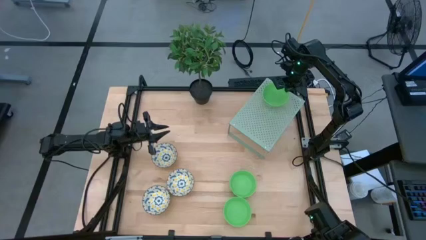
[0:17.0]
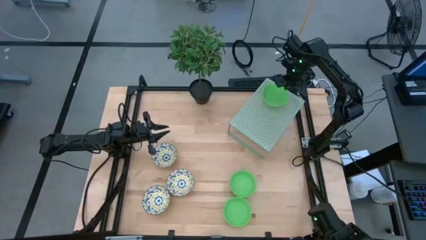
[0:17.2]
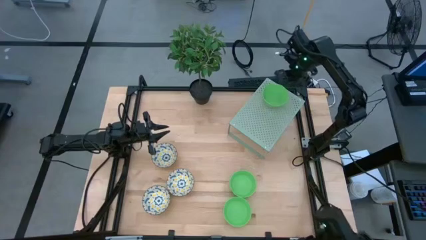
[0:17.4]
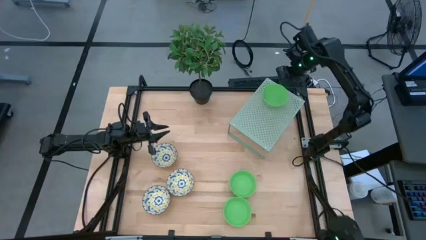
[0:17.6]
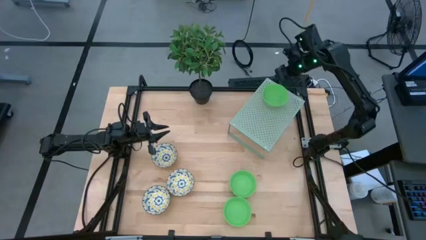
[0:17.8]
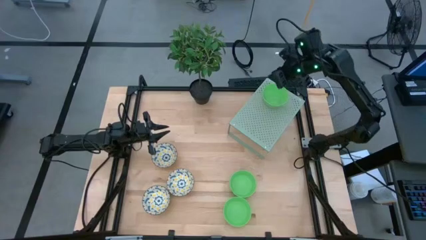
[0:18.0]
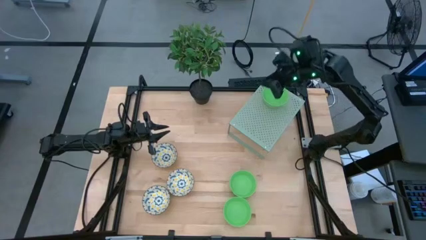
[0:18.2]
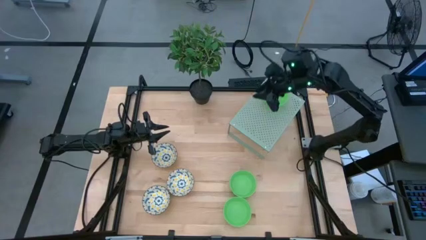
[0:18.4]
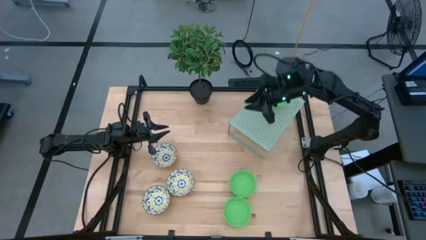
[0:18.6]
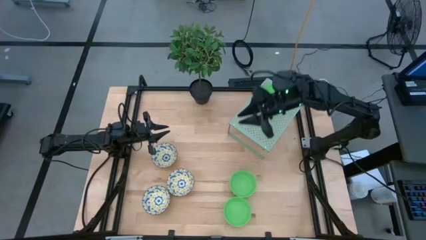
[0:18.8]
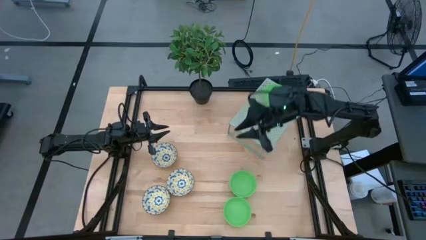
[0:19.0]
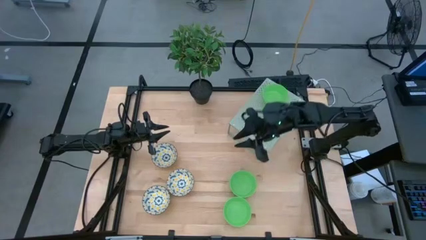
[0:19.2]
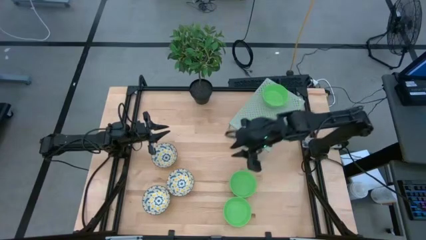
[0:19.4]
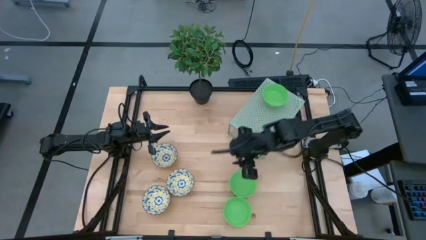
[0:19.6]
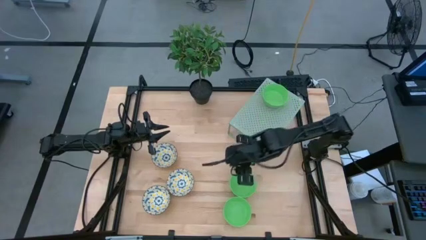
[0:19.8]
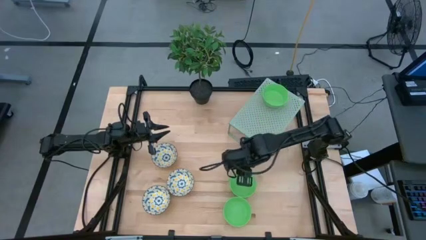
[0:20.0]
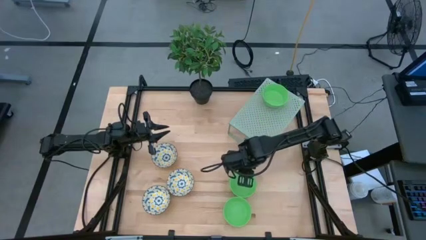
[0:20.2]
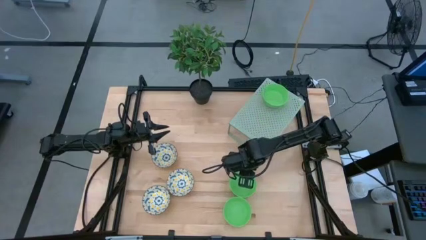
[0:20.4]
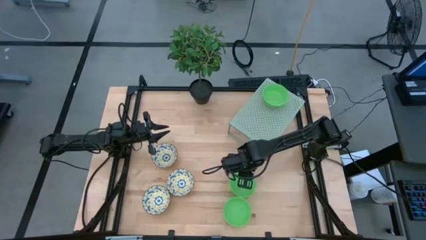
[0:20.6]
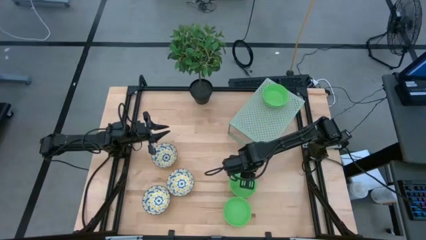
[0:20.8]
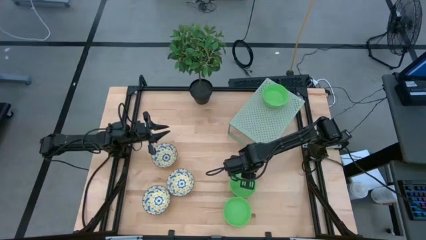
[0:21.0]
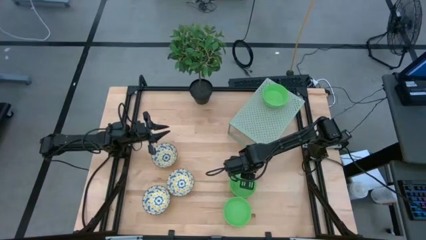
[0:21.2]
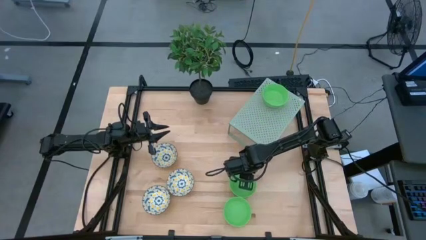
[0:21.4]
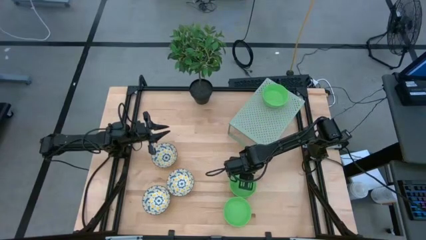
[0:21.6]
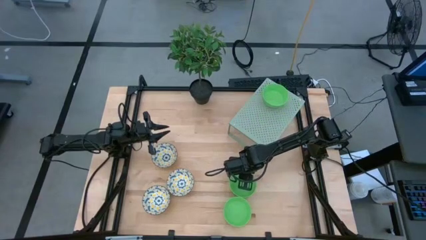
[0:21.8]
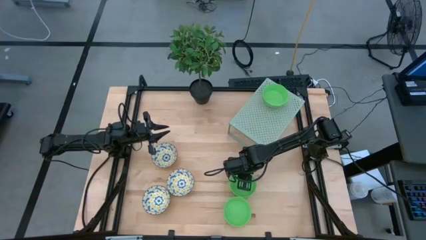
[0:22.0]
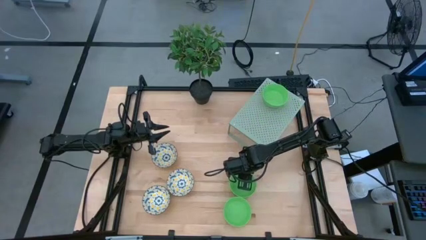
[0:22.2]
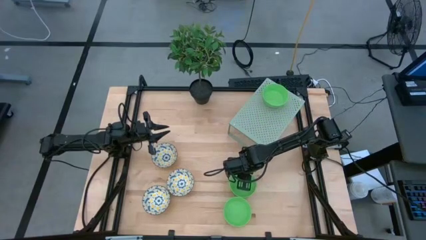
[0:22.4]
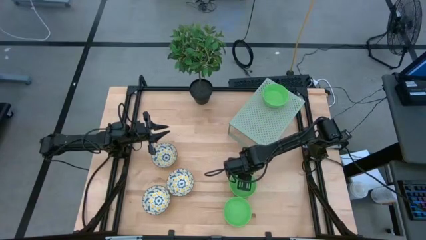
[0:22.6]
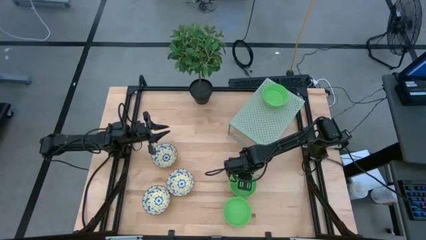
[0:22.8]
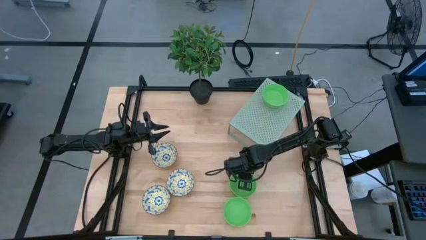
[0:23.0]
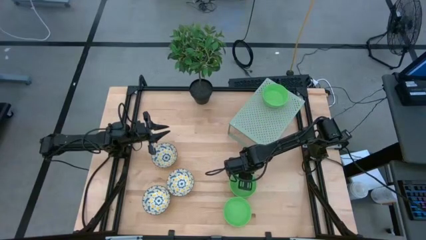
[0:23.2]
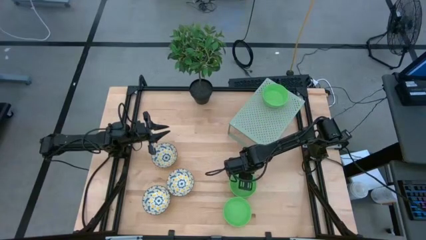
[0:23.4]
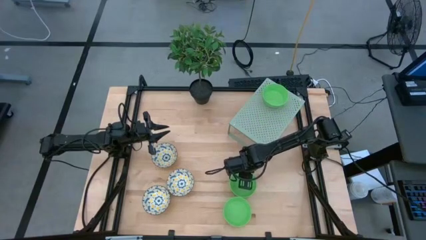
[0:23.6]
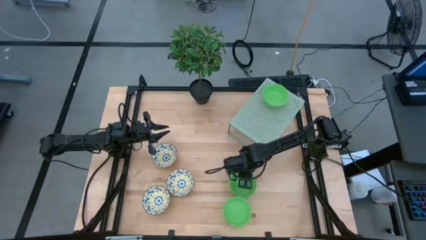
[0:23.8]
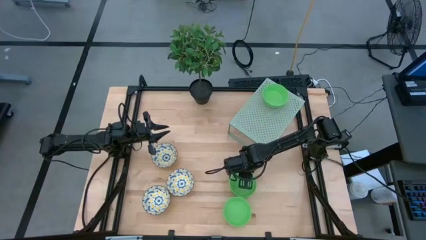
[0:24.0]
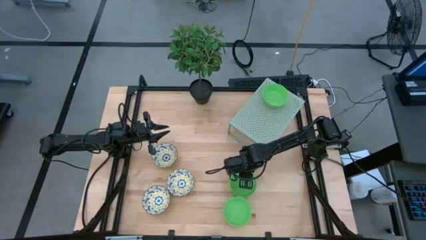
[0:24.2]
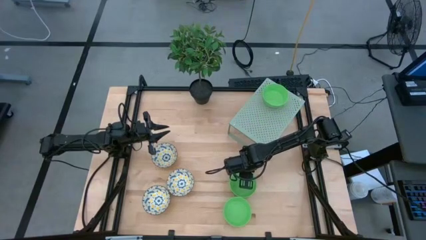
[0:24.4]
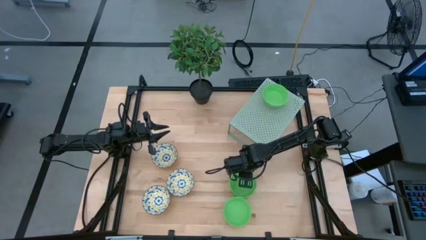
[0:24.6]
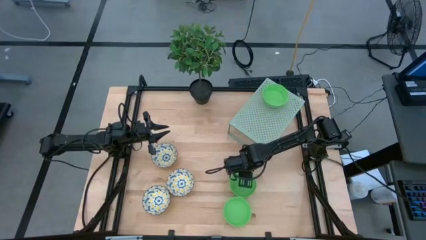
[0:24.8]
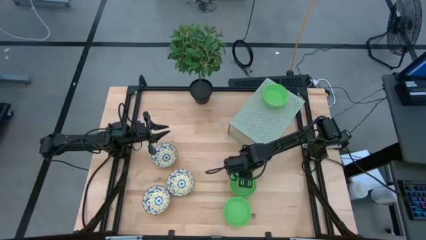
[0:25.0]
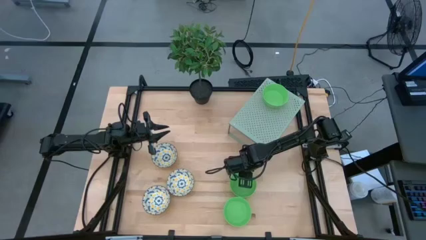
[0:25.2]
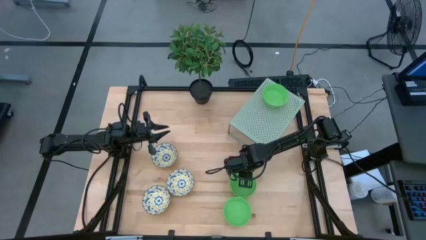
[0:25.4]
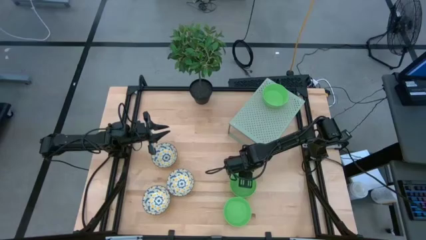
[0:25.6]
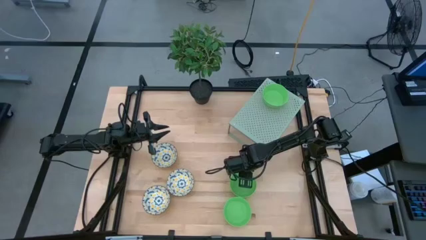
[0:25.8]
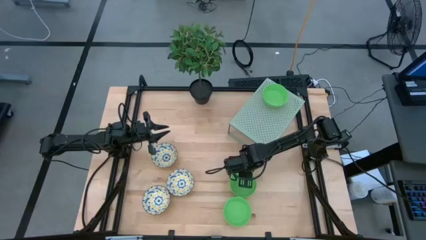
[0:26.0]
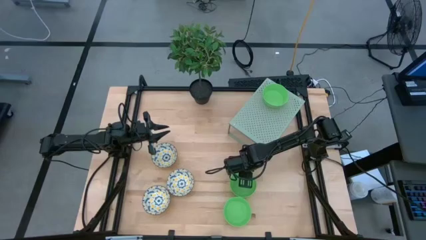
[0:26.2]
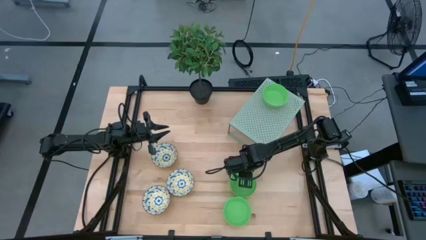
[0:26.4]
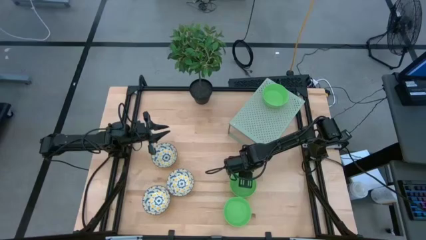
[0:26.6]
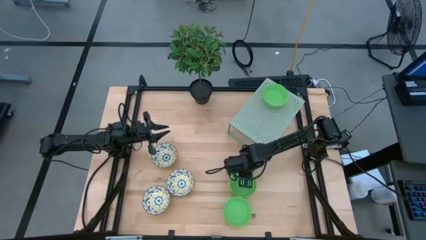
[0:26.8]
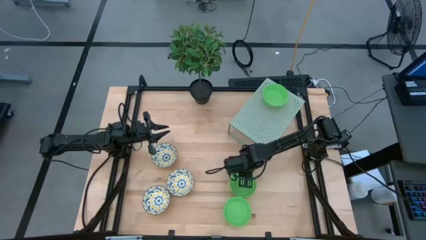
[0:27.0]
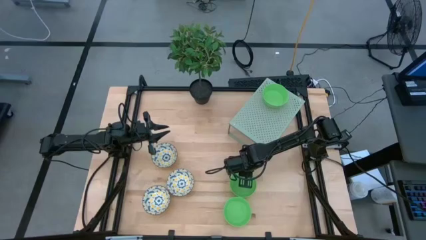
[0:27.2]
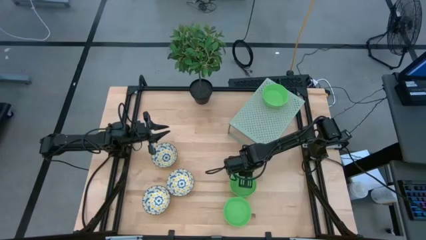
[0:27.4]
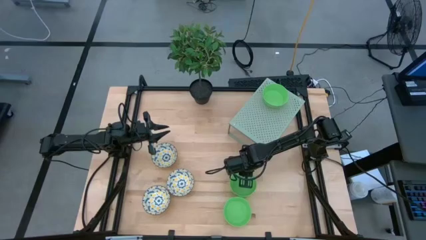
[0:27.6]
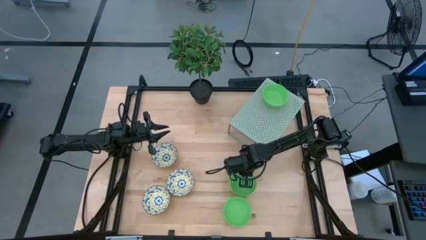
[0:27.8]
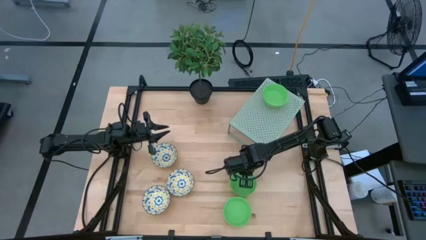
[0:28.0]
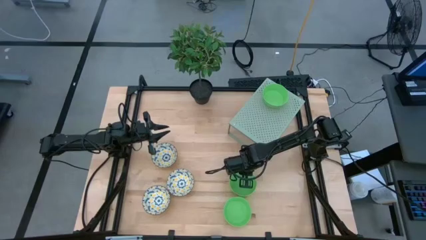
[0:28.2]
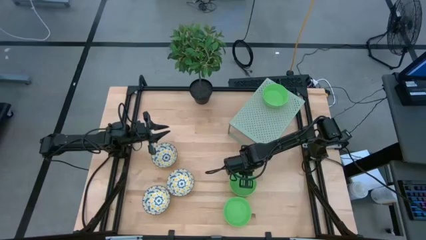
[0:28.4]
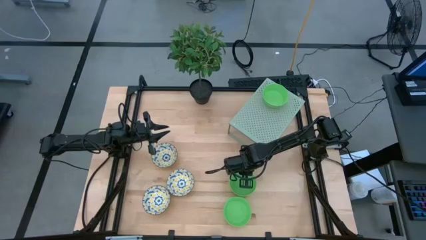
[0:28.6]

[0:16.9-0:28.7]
Task: Pick & Place Mini bowls
Stack the top green bowl on the green bowl on the shelf
